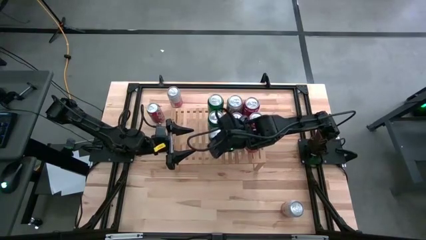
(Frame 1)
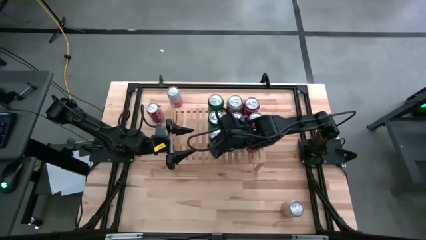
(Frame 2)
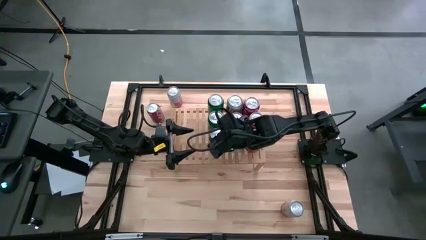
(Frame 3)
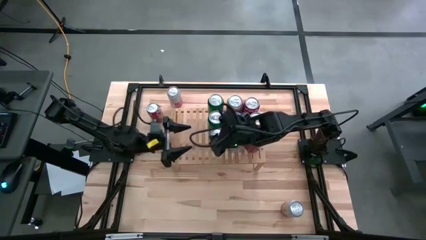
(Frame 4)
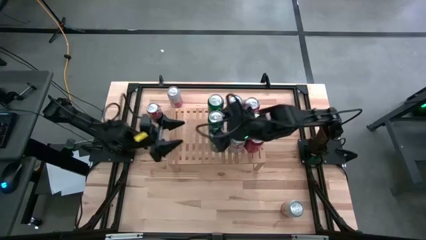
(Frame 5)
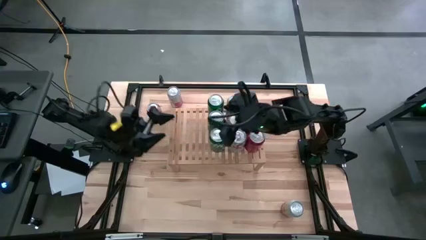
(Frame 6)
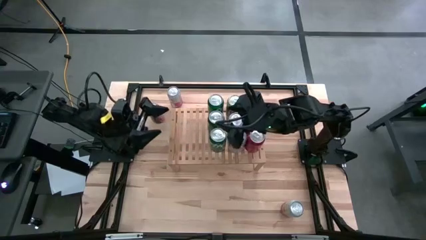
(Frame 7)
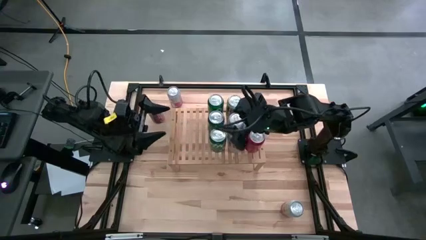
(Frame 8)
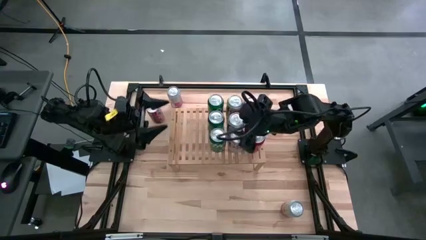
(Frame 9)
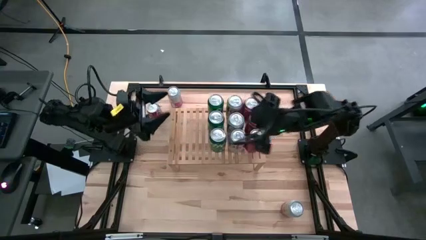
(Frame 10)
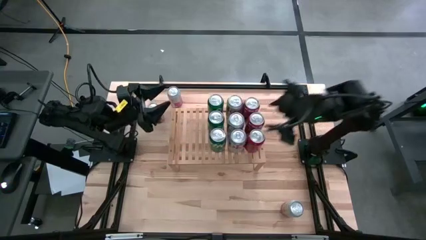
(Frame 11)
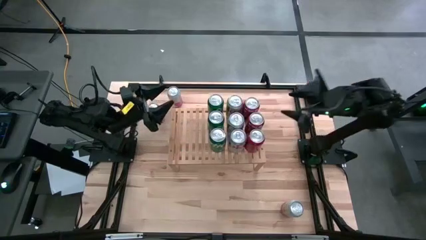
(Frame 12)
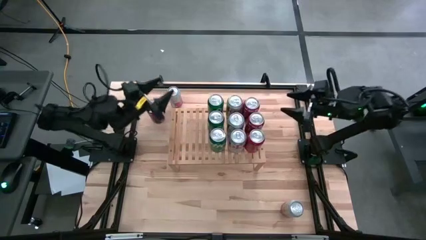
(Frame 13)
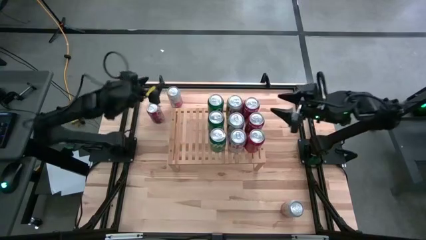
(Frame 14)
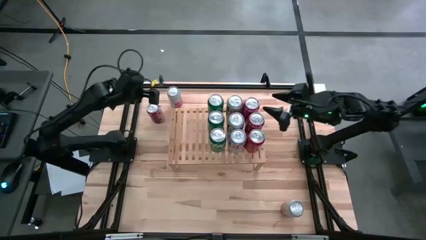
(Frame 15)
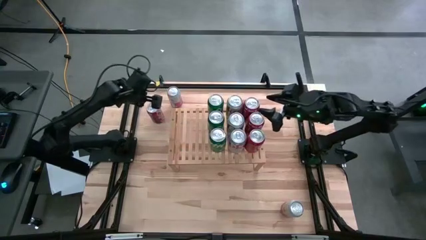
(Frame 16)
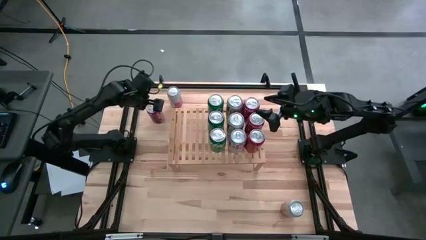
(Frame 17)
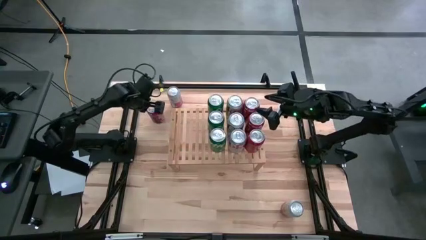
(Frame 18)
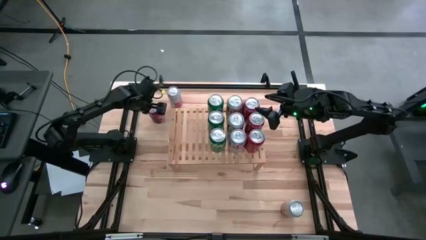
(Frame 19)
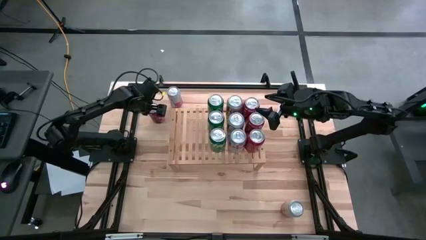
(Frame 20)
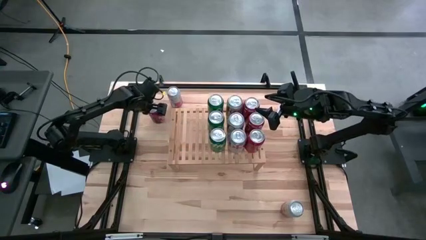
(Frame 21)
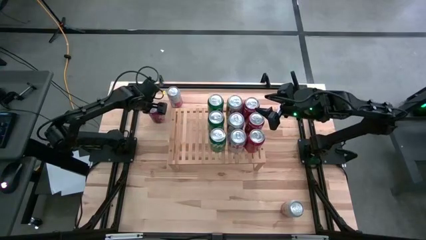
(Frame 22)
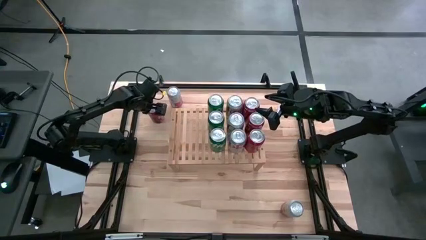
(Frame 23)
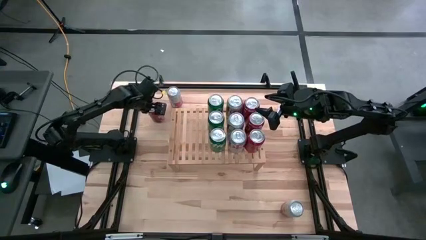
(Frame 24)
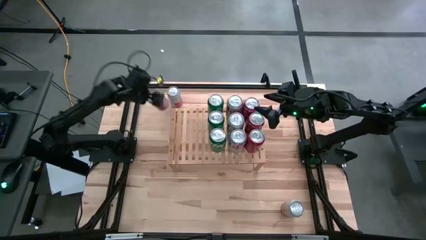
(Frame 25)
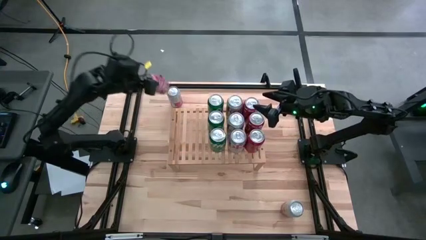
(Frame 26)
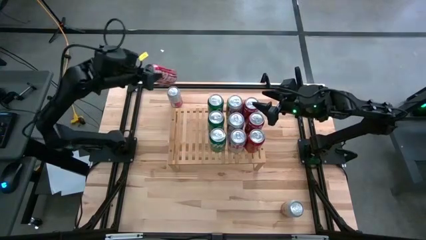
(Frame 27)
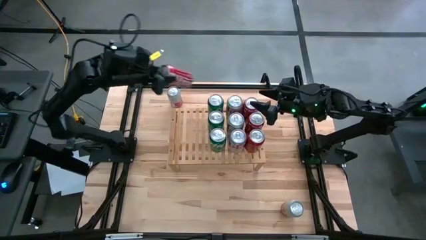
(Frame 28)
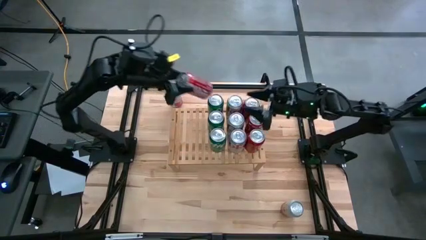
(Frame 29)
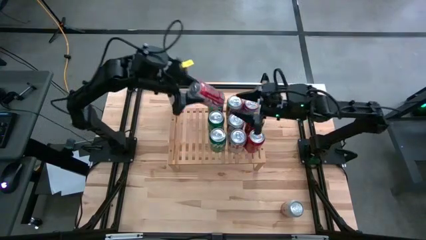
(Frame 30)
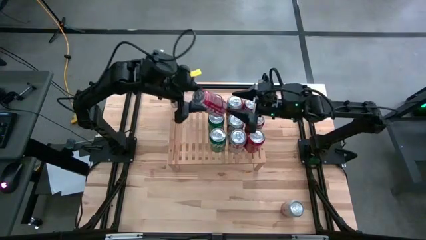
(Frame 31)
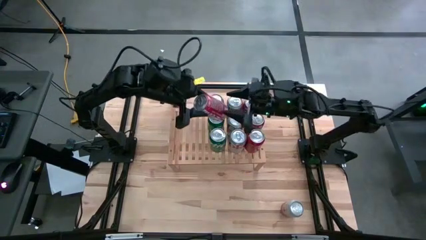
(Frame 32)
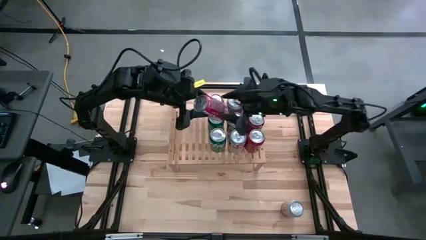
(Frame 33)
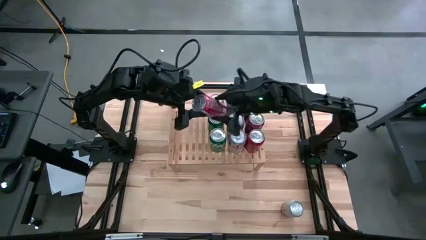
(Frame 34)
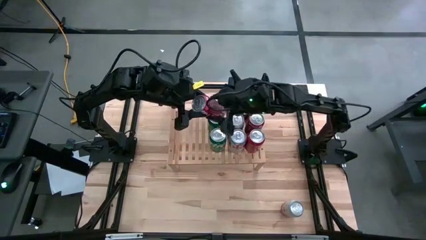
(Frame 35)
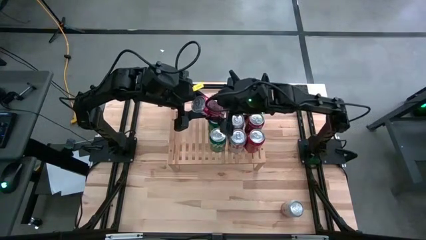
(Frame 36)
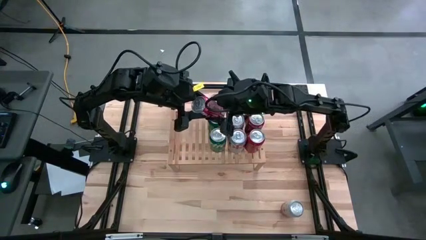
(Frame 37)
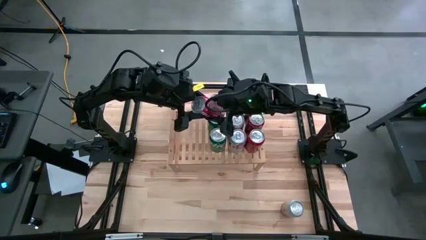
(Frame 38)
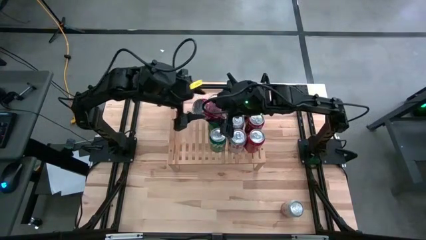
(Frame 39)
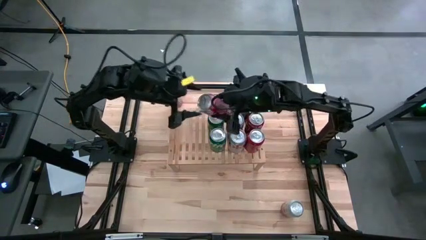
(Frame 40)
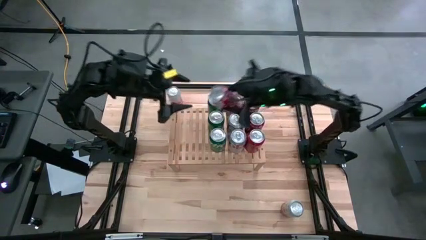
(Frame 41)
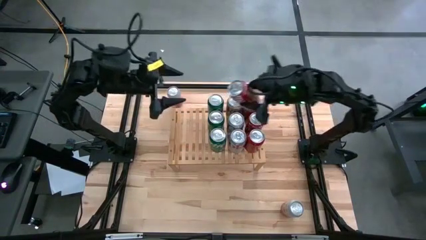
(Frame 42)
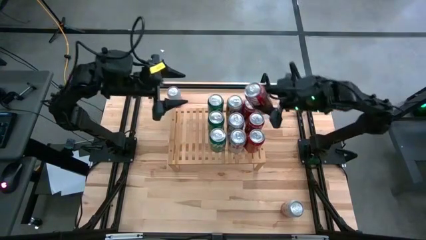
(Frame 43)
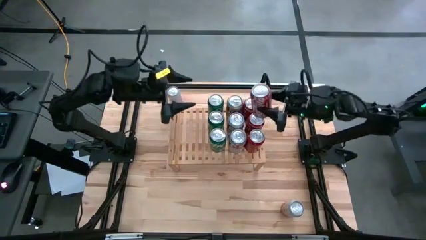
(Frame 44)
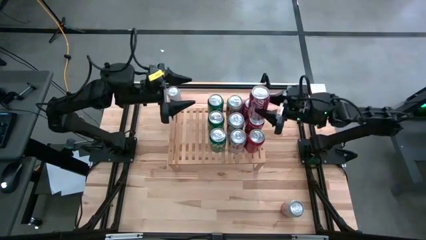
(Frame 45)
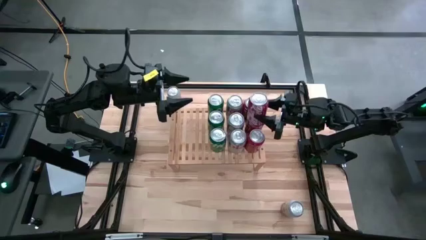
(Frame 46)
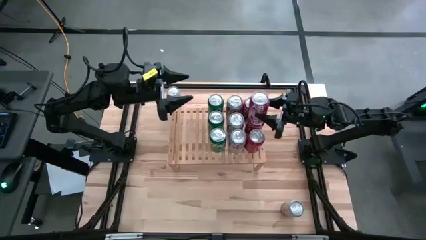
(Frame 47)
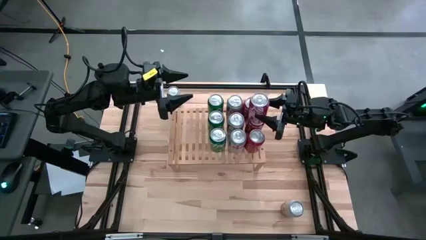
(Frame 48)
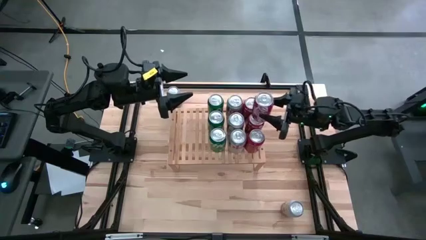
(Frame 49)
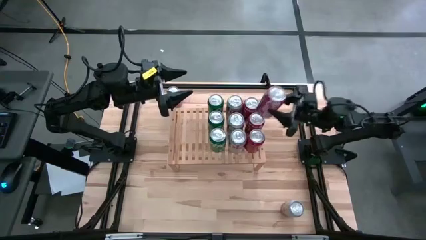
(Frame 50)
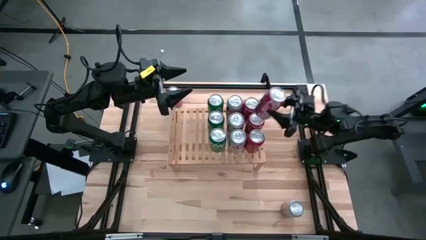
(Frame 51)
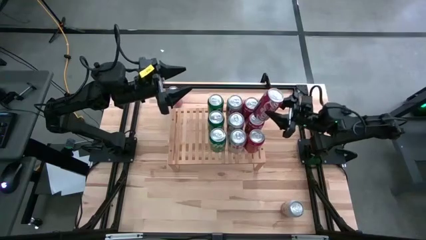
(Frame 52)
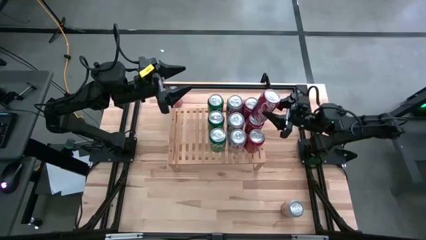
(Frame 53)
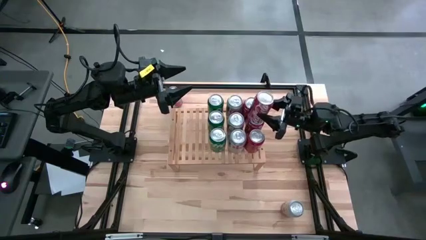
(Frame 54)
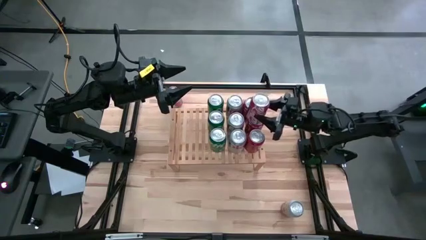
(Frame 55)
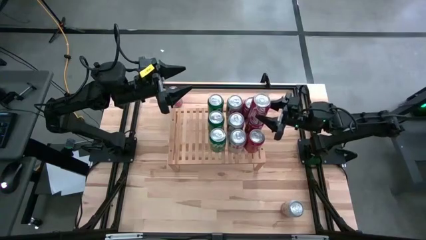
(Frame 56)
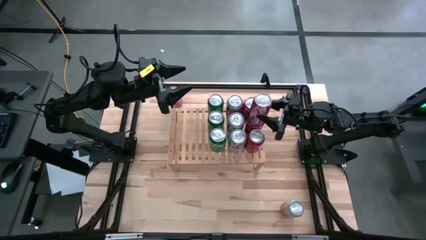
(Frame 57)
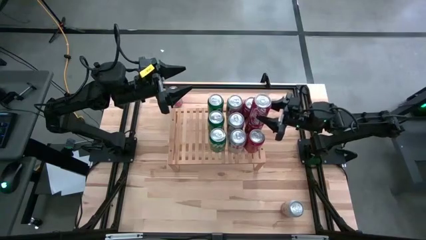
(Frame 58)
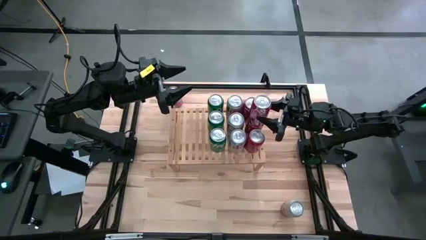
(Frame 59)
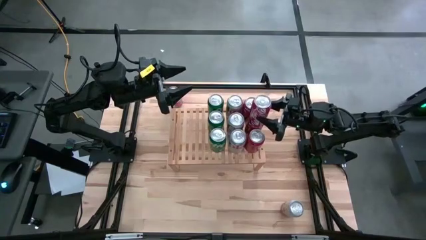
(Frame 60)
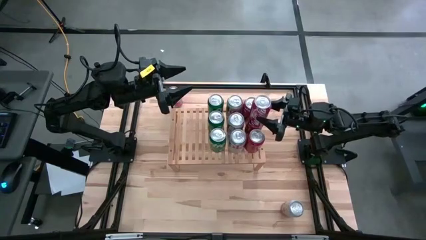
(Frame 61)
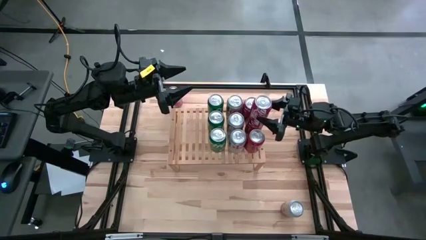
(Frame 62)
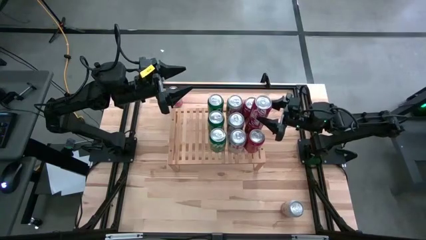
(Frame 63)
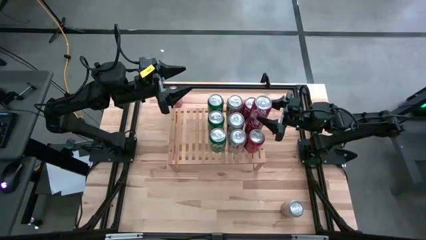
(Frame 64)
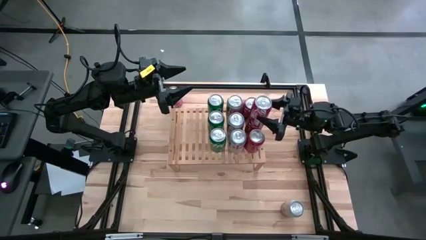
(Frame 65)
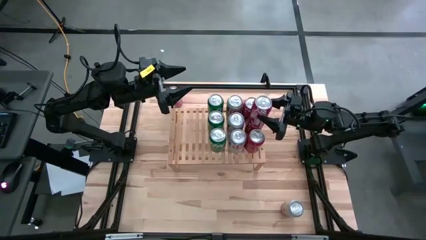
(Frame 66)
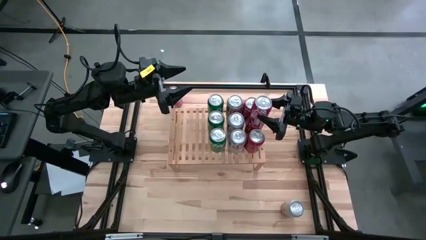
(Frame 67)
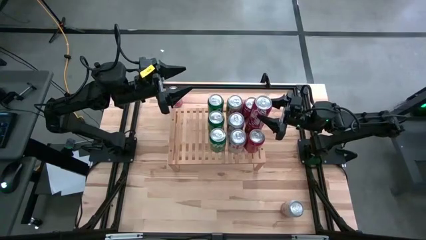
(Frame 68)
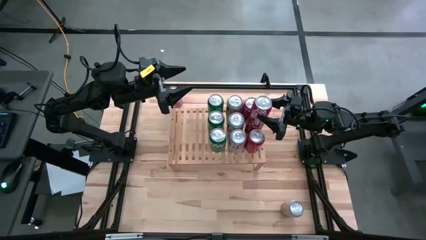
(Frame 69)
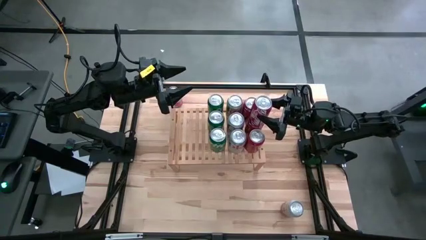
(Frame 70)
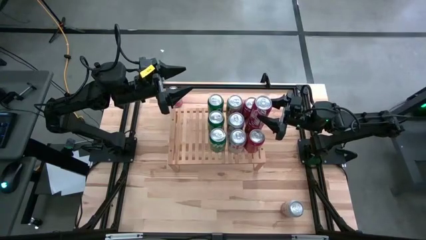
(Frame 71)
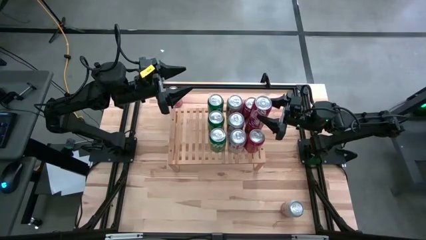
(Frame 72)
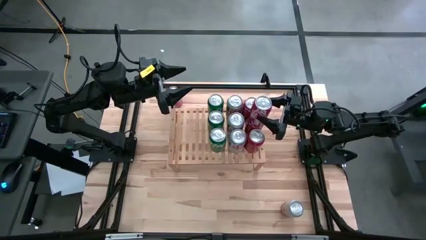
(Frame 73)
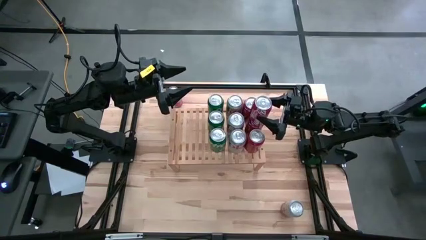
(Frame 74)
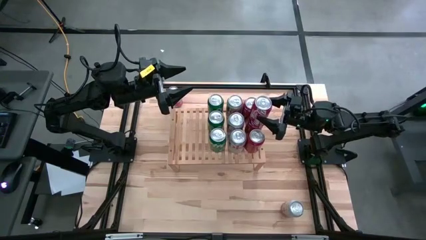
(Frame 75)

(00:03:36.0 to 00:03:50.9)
Task: Place canned beverage on shelf
Stack the red soda can on top of the red soda can on the shelf

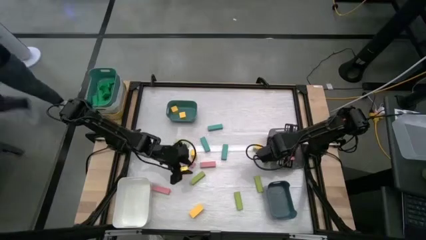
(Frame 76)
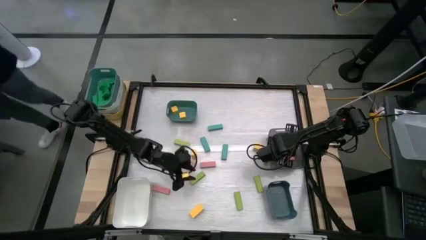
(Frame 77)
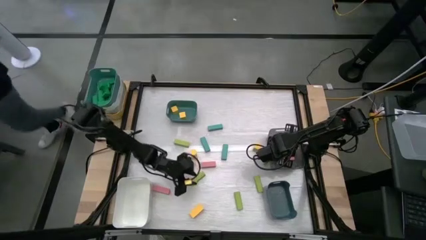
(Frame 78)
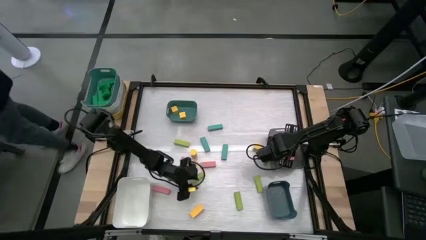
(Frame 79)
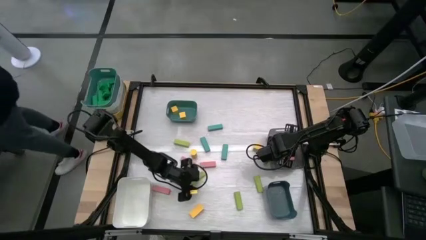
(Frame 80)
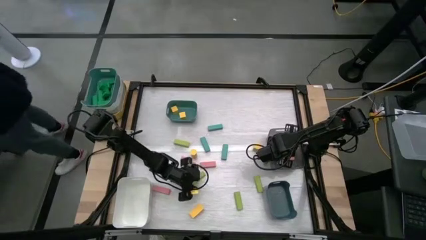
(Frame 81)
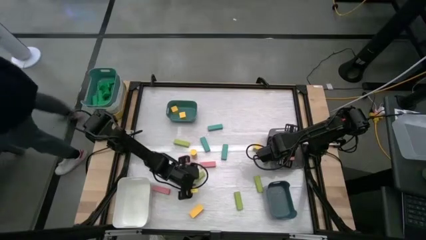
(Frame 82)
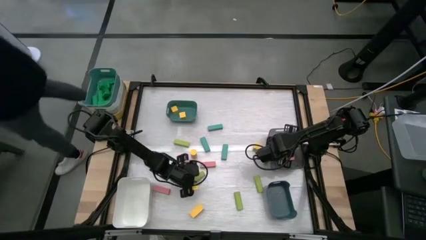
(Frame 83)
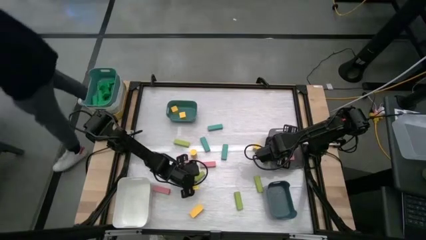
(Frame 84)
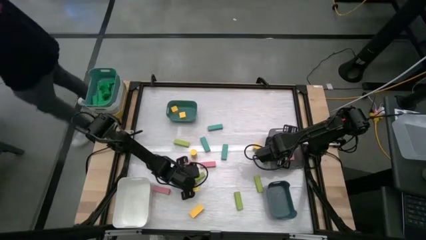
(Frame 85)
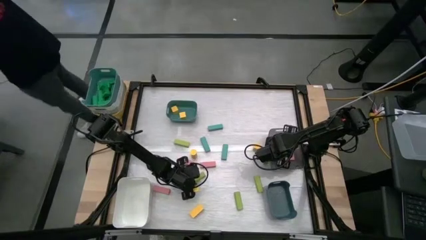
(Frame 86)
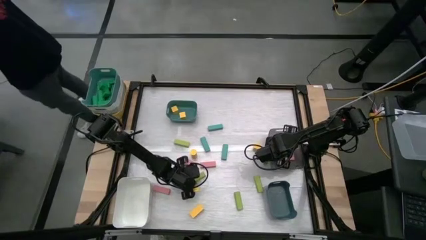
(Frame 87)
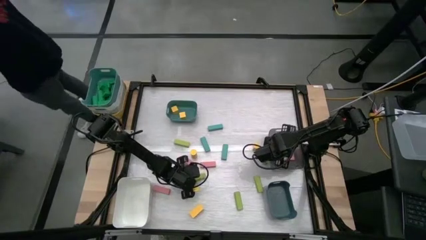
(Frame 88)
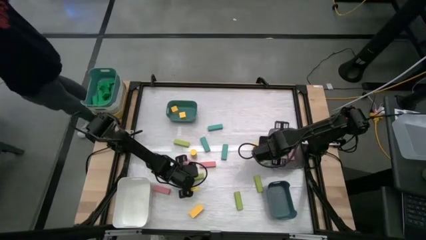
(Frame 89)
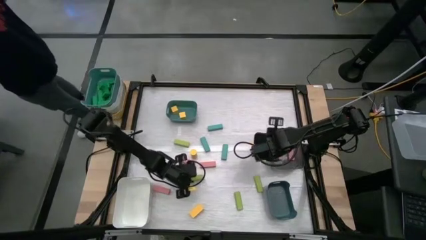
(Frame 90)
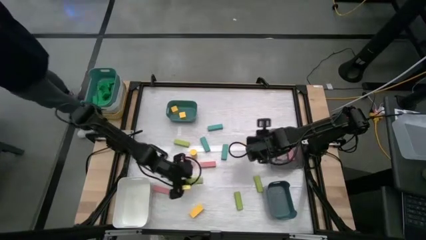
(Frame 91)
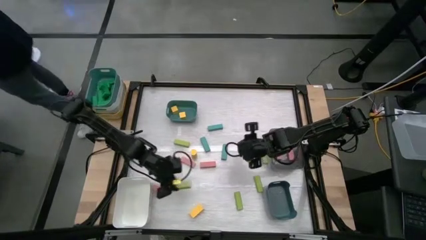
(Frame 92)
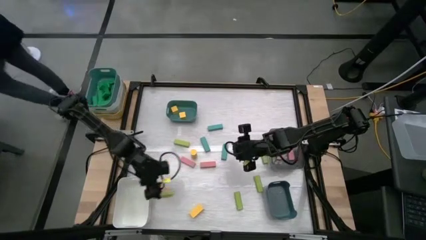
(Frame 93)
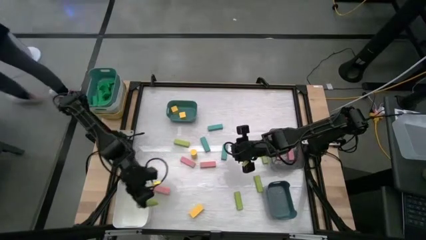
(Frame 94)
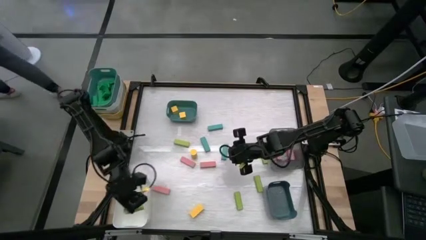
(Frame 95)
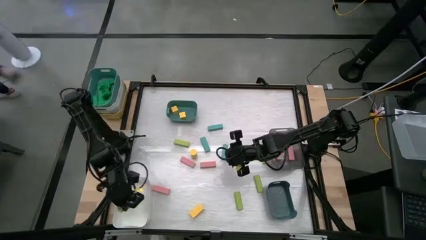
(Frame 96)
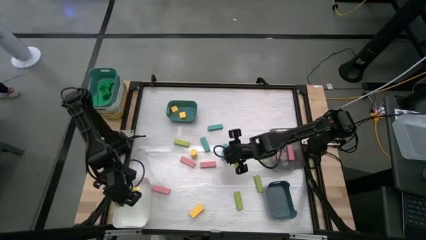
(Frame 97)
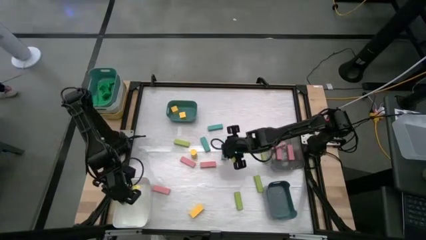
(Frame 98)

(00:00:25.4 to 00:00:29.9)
Task: Sort blocks
Put the green block into the white bin
